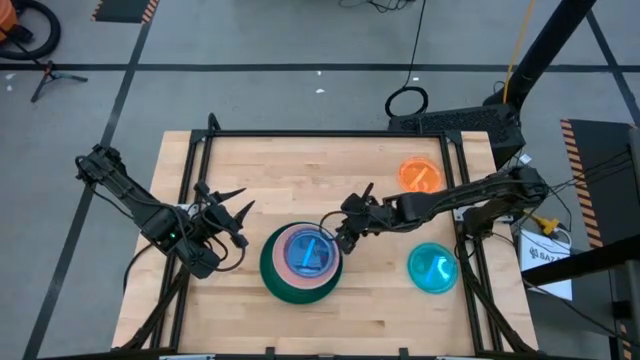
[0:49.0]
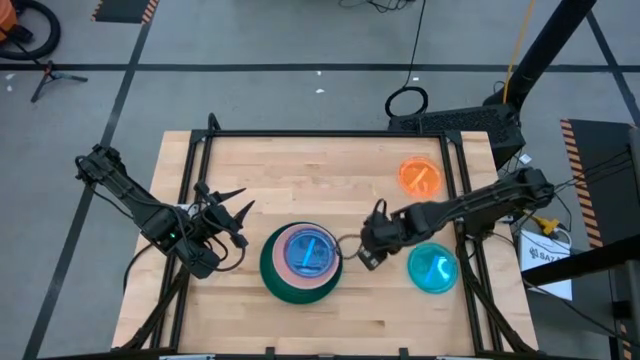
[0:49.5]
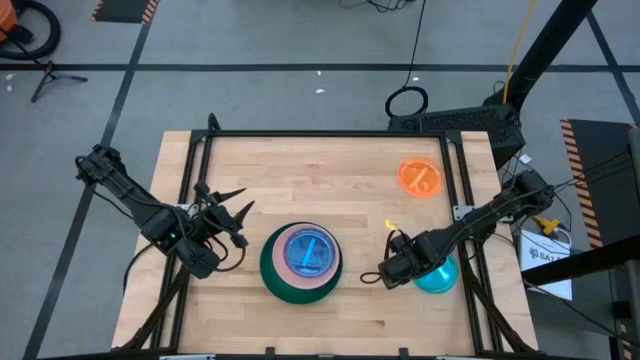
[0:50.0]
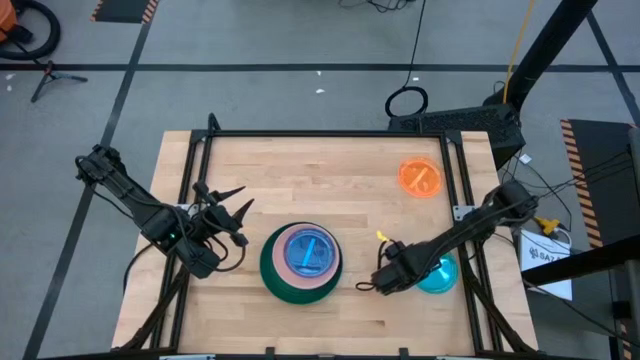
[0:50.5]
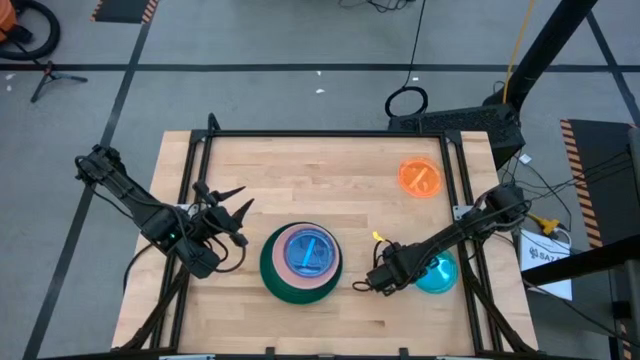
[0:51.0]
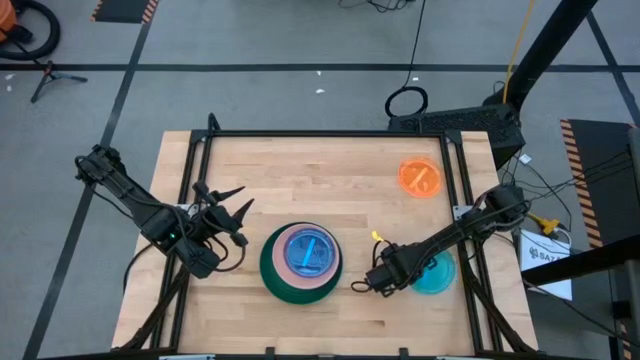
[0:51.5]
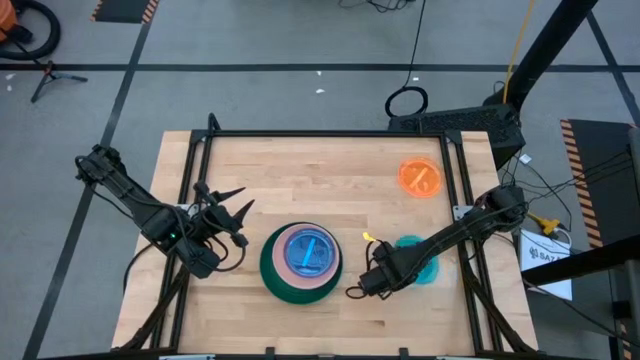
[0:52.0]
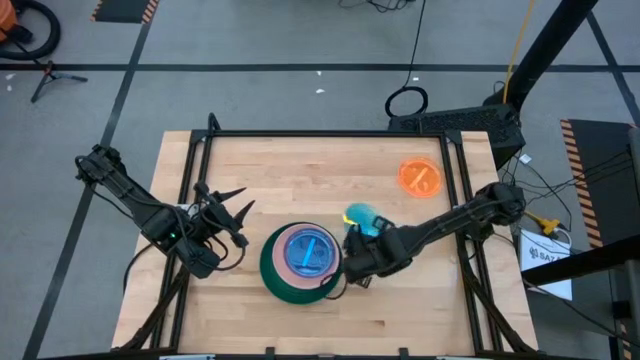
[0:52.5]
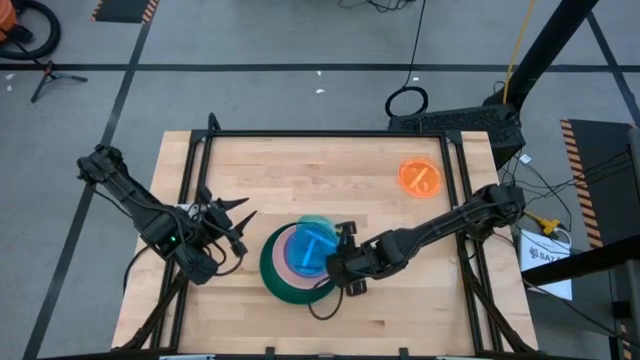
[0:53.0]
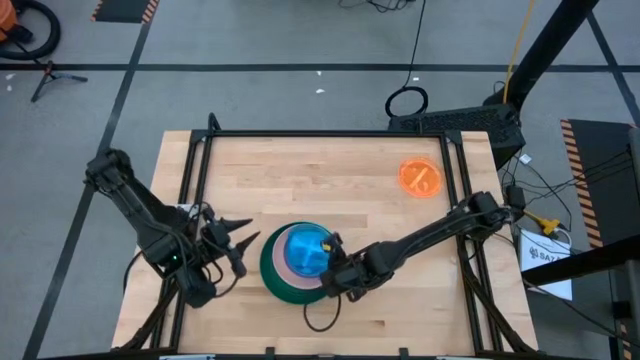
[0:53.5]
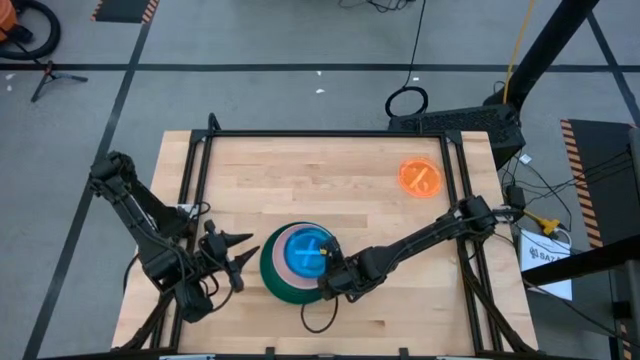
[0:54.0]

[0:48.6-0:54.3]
Task: Stack plastic plates
Stack the blue plate on top of the blue plate

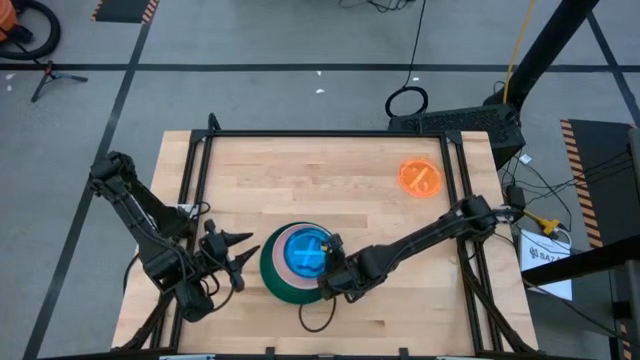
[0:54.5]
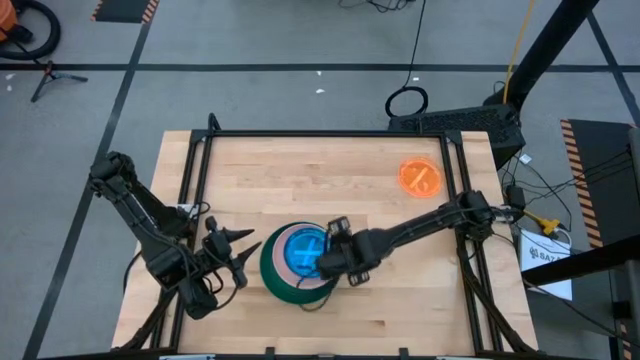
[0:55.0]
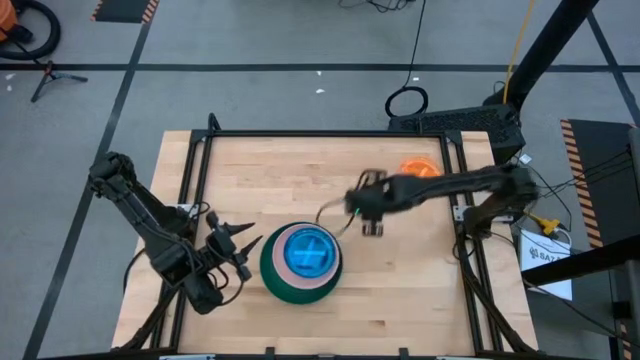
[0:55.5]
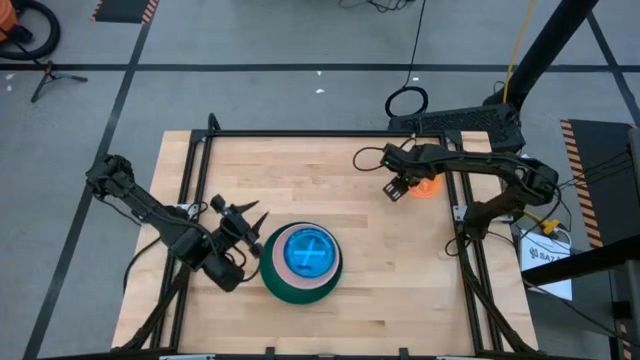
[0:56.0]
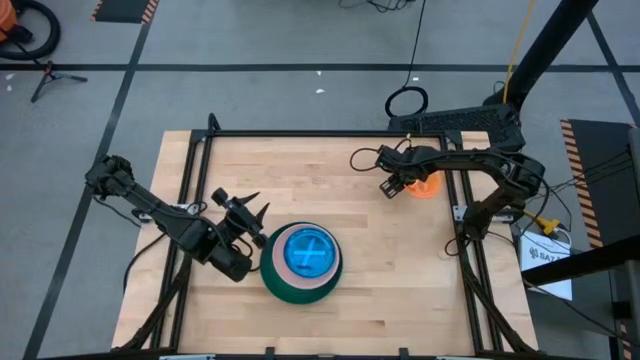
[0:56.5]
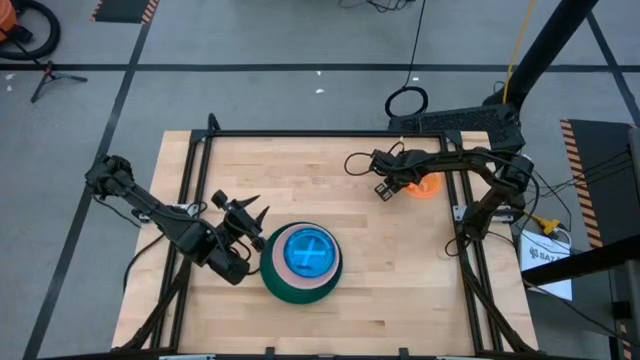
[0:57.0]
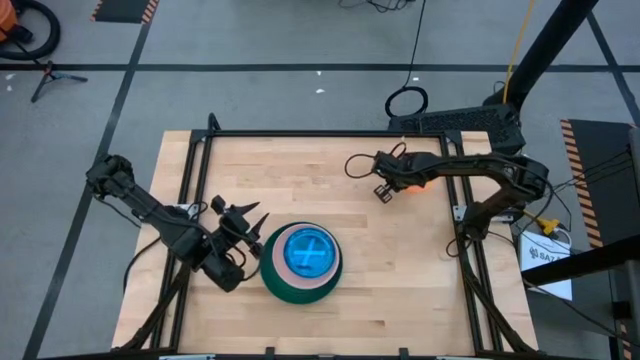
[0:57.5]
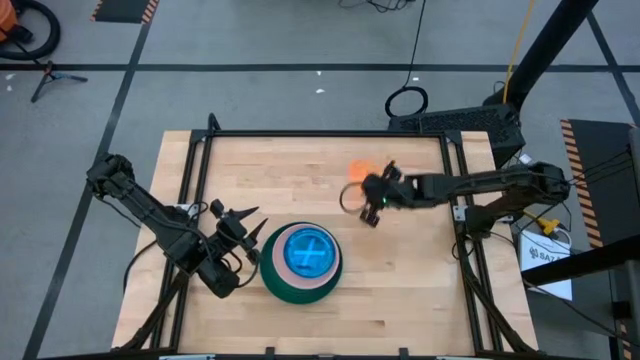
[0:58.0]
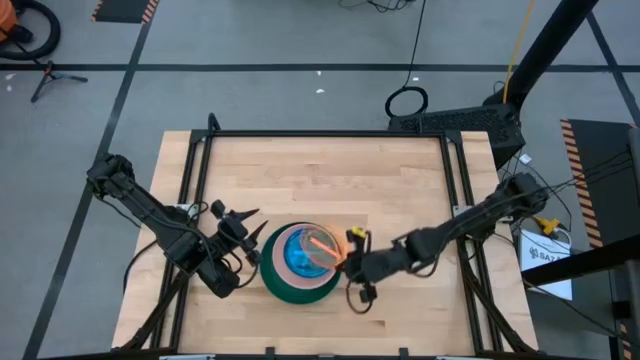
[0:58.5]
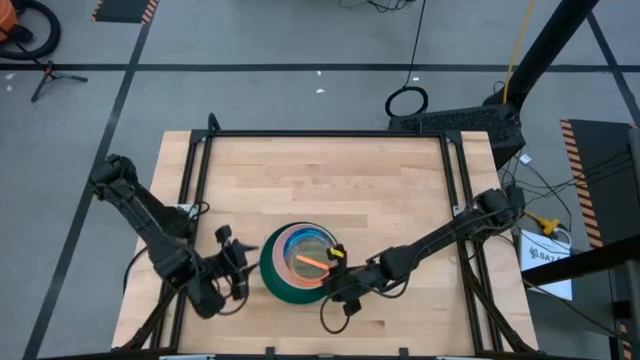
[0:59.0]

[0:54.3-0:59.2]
Stack the light orange plate on the blue plate

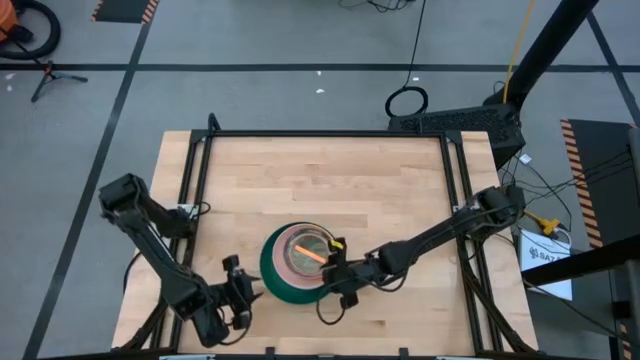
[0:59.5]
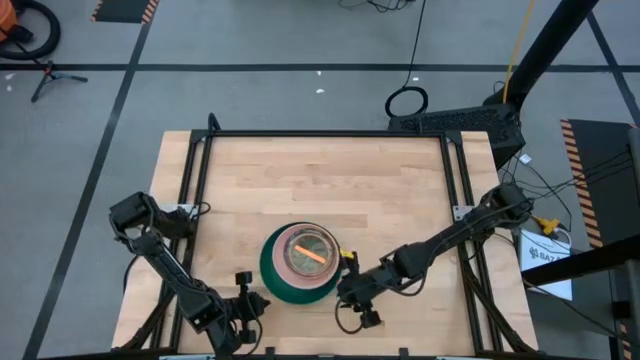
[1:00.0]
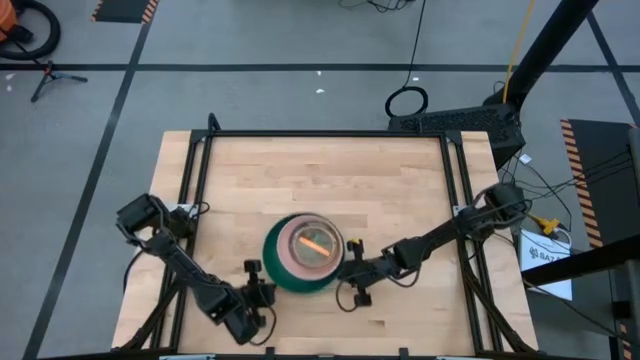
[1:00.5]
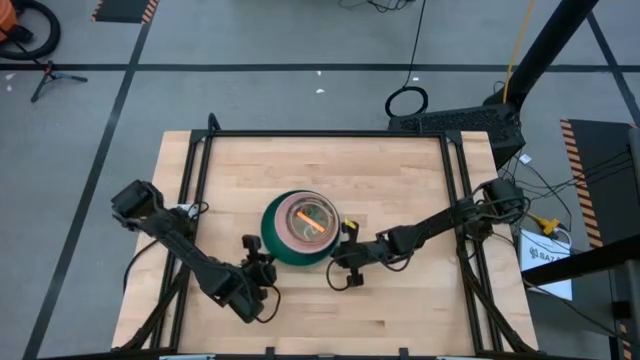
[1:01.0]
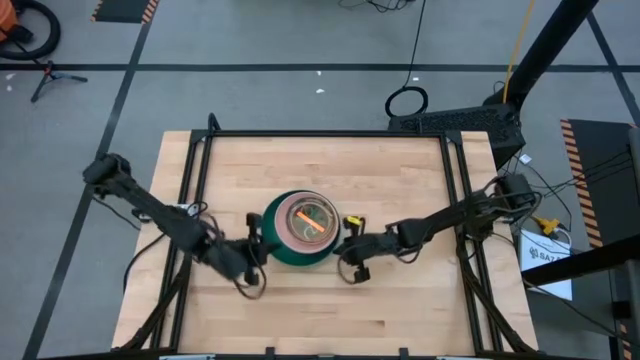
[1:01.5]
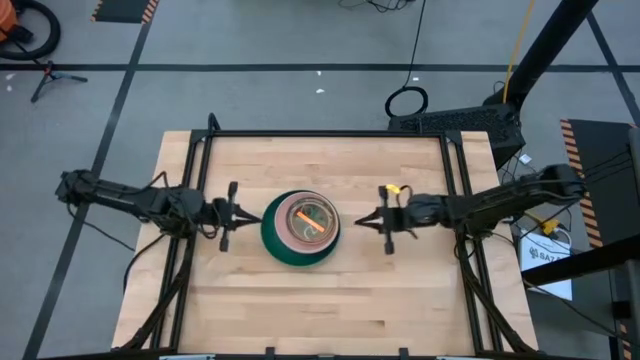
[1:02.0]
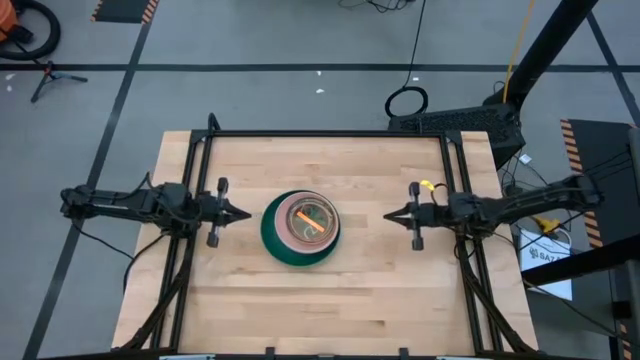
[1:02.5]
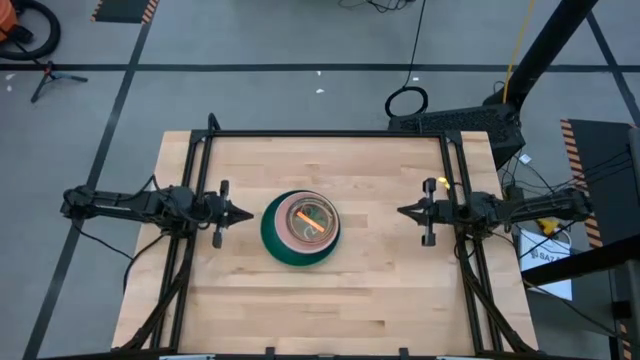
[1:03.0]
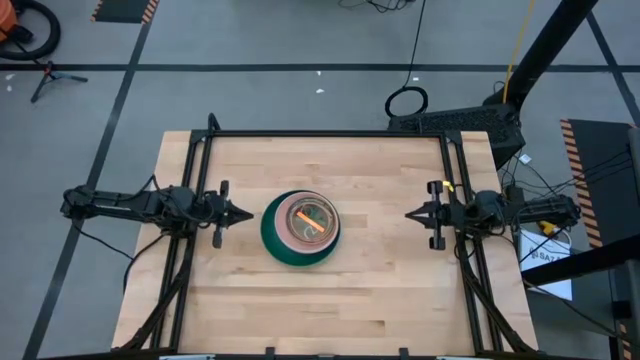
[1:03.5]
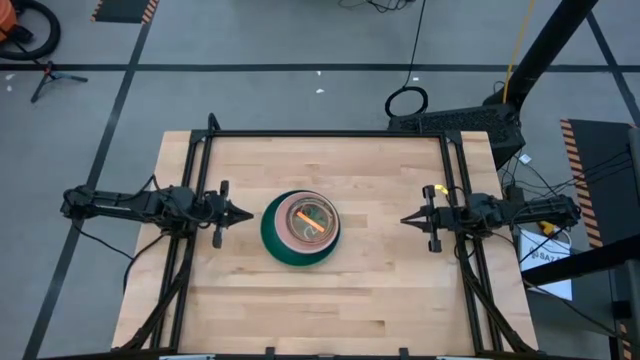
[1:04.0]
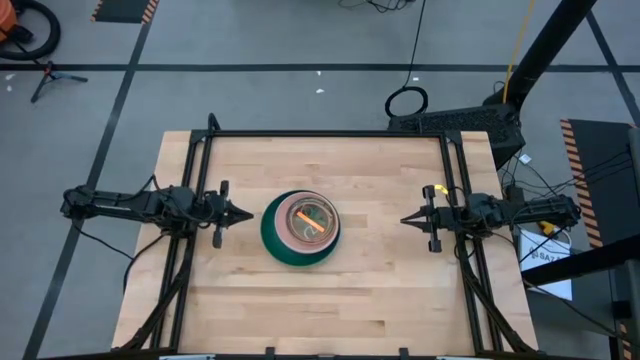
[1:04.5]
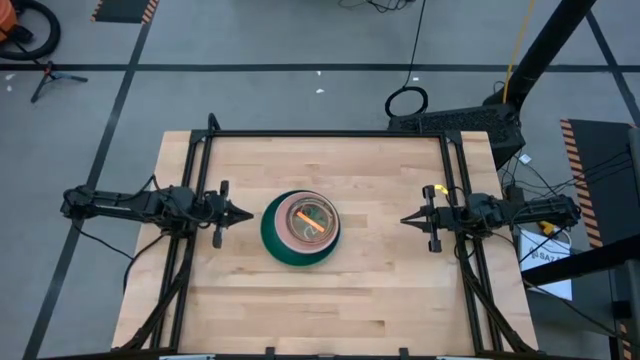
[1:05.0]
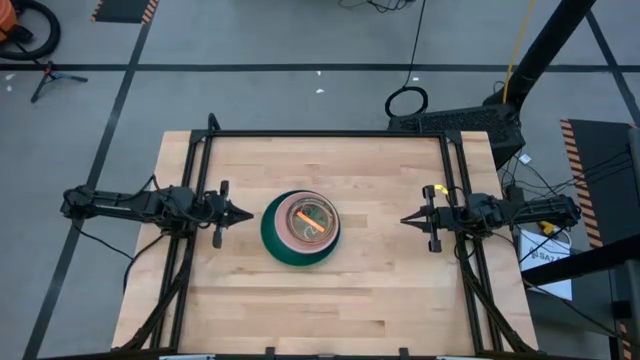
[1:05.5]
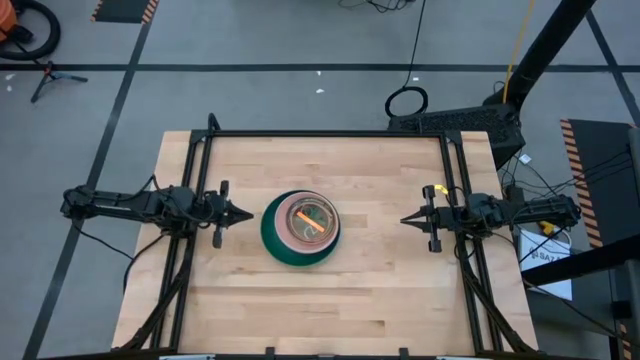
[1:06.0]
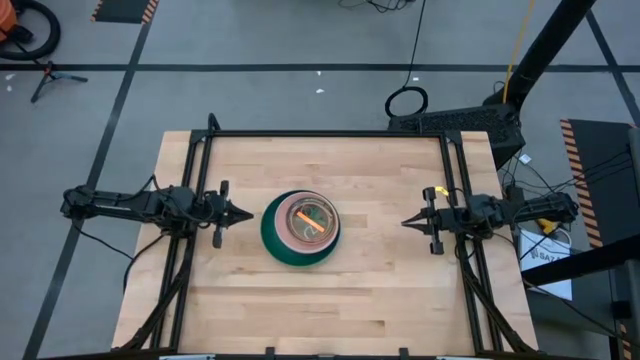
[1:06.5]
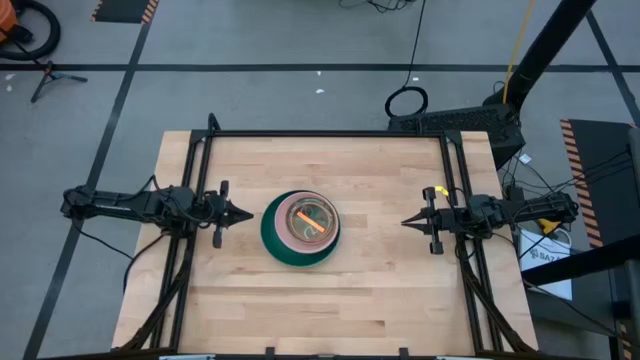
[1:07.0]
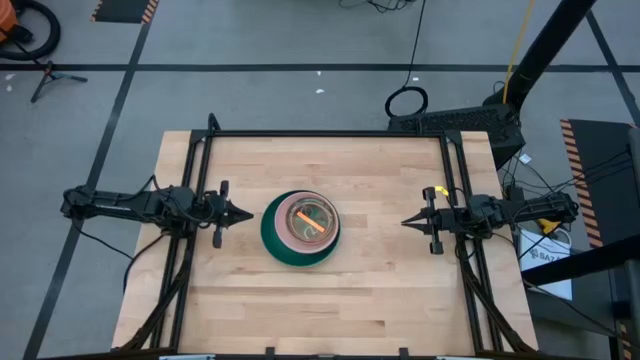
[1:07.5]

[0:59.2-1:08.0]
Return to Home Position

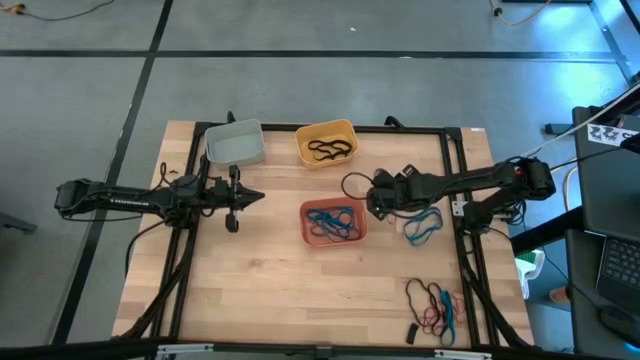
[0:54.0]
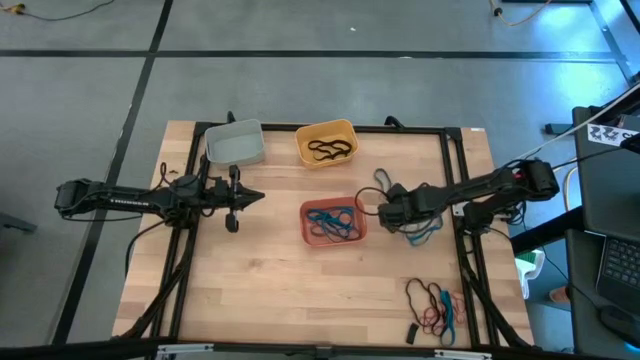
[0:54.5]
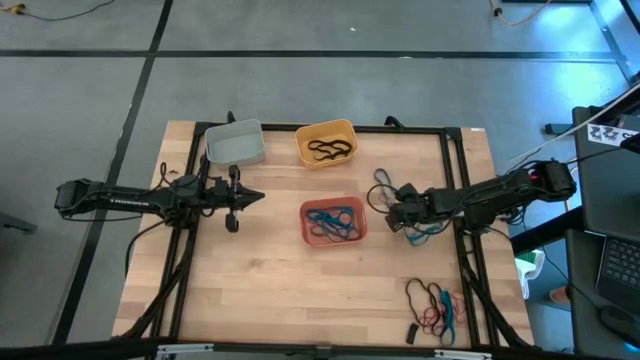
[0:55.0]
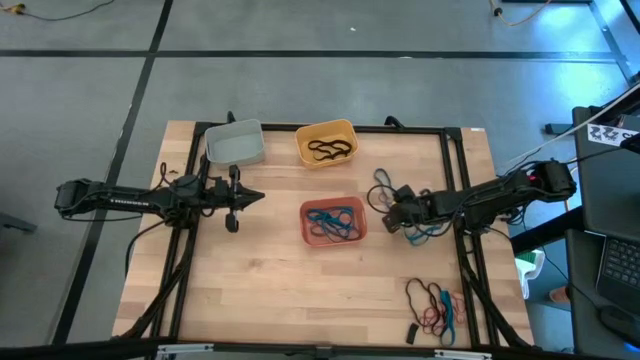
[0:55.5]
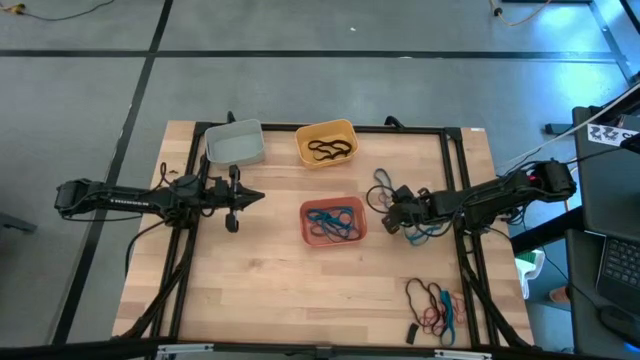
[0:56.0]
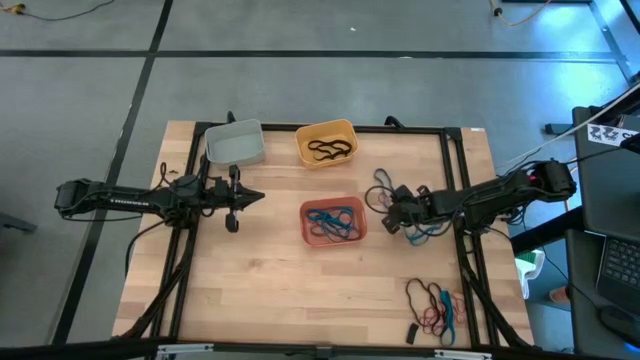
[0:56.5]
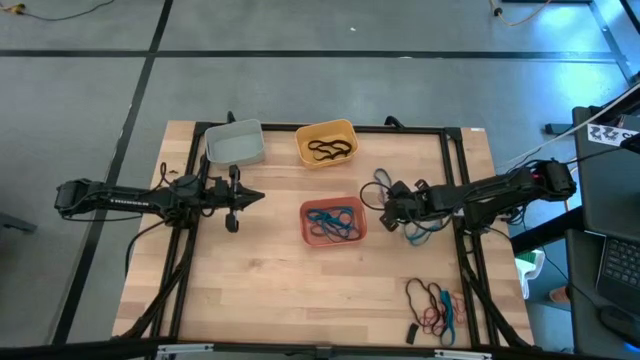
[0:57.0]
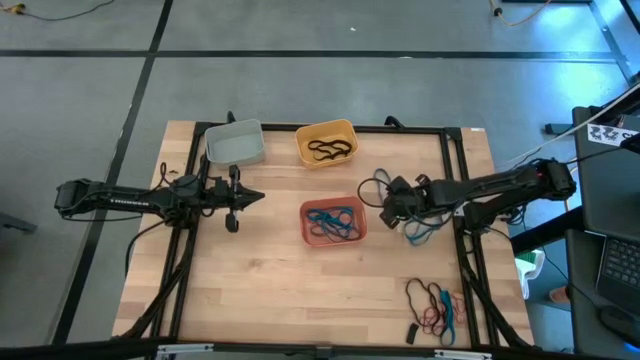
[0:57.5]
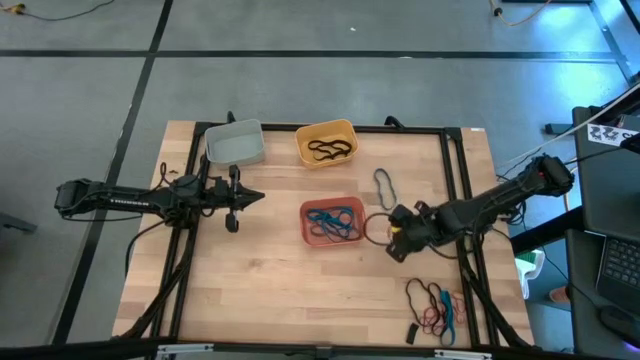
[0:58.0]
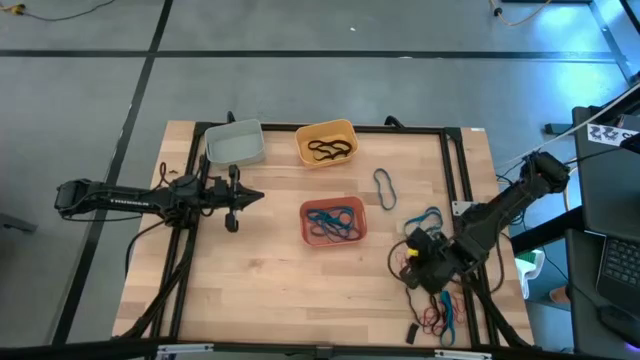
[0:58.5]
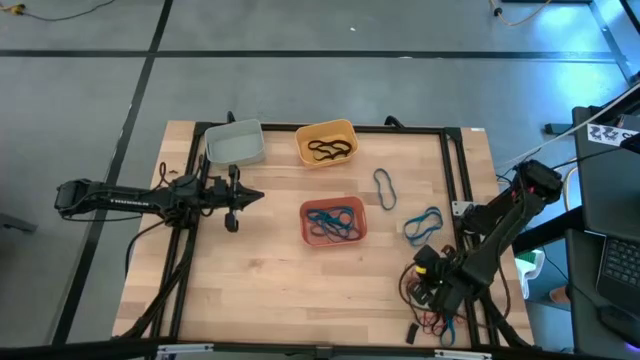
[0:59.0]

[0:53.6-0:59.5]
Task: Sort rubber bands into baskets
Move the red rubber band to the bottom of the table
